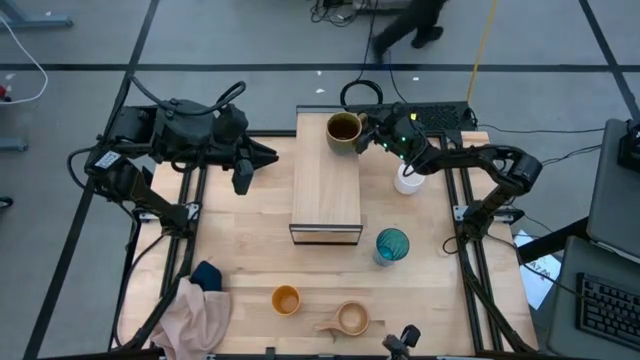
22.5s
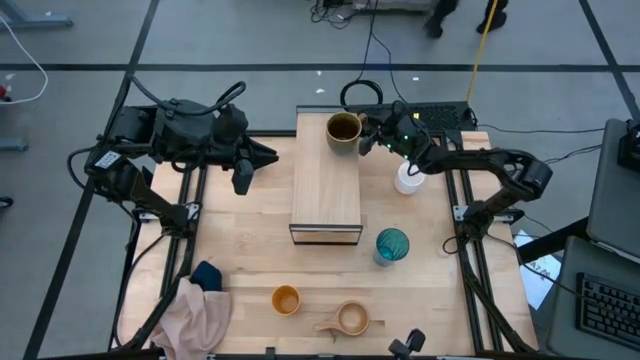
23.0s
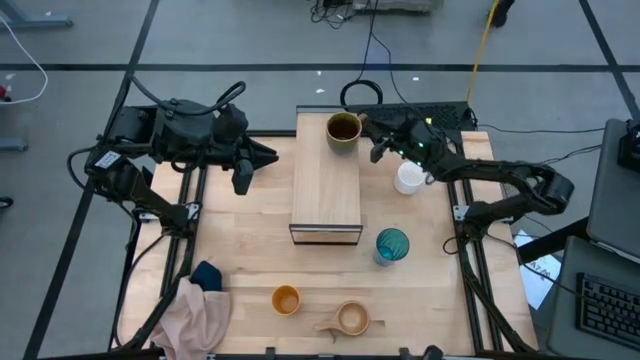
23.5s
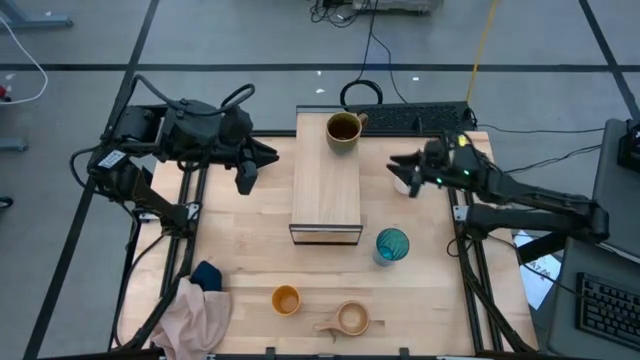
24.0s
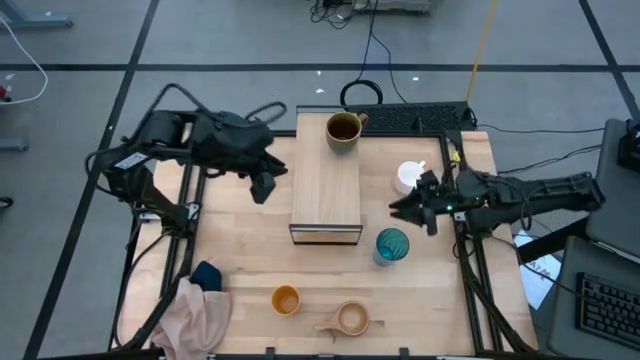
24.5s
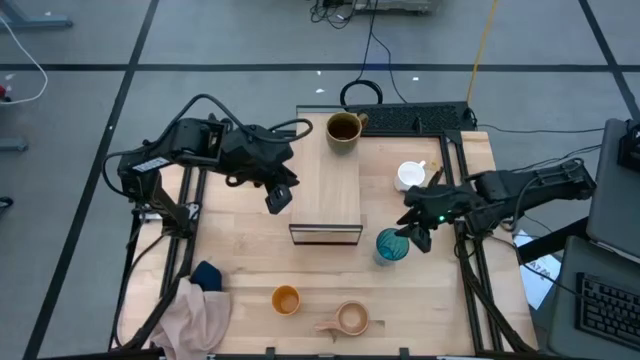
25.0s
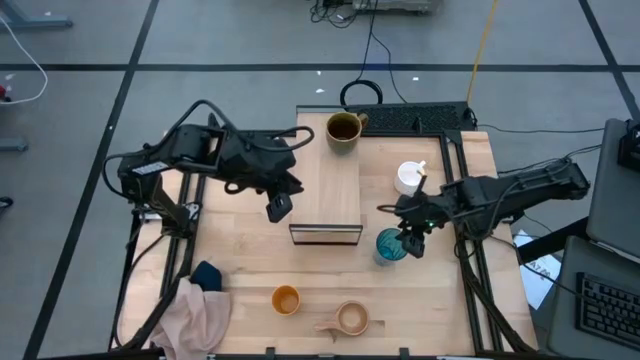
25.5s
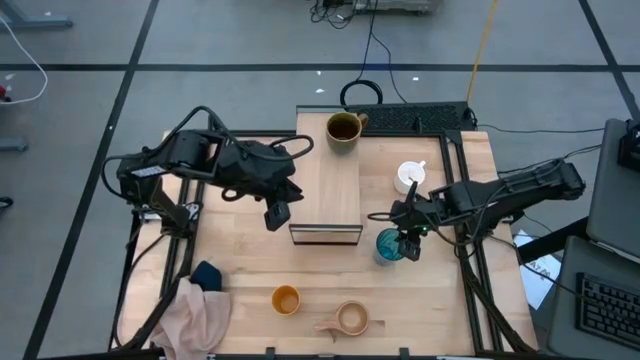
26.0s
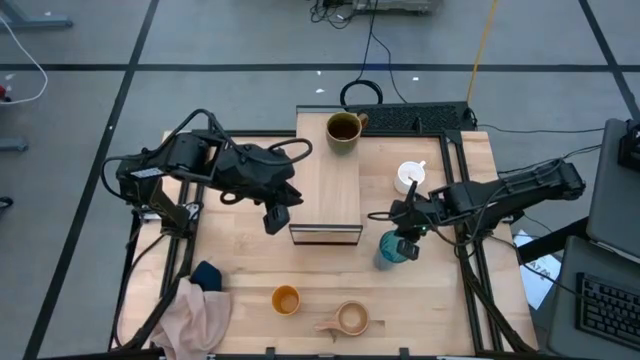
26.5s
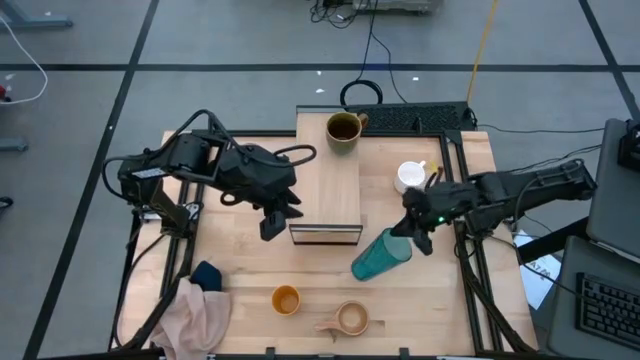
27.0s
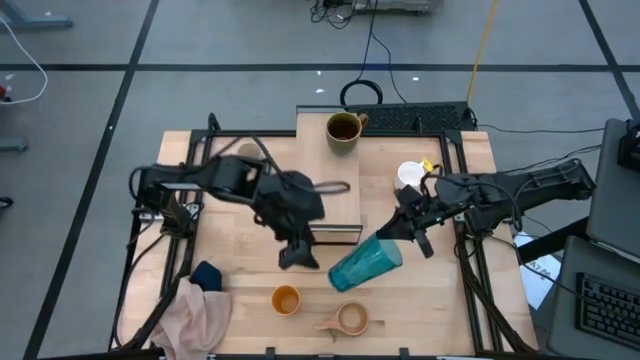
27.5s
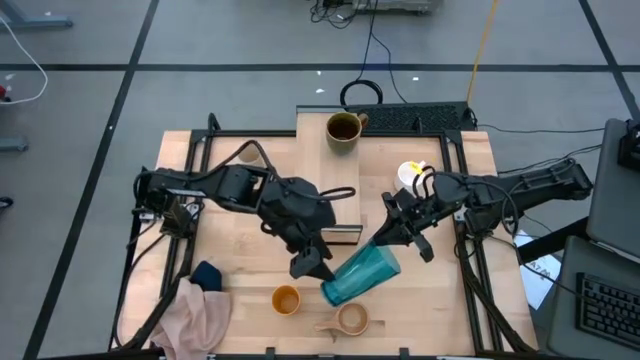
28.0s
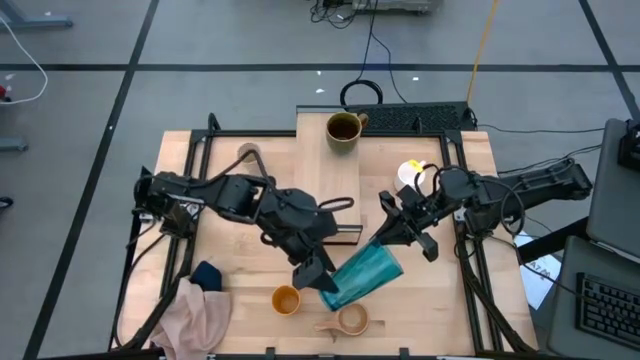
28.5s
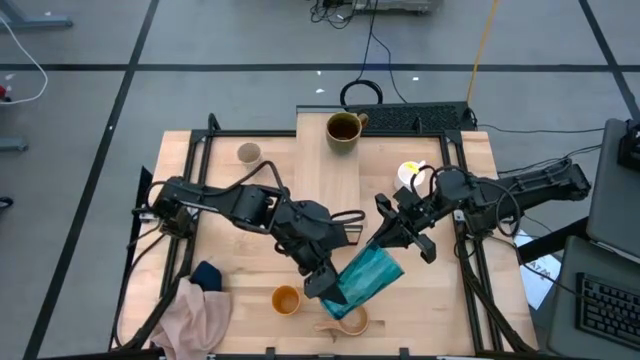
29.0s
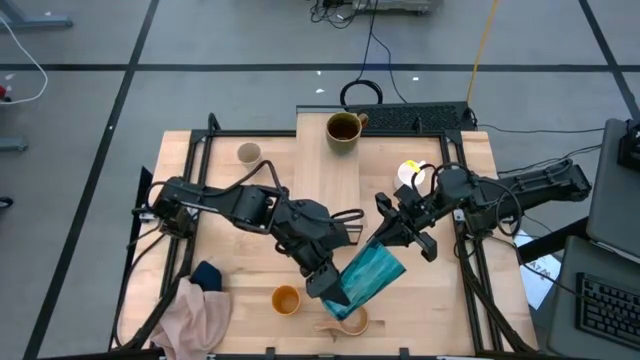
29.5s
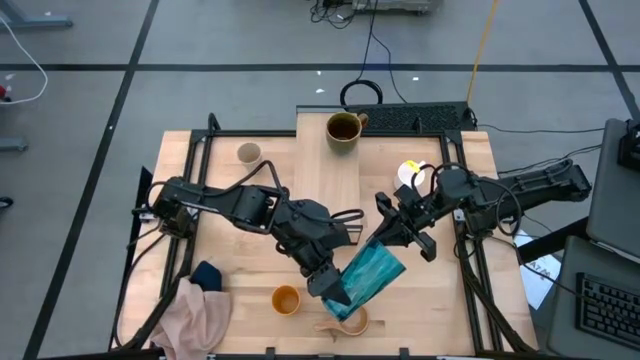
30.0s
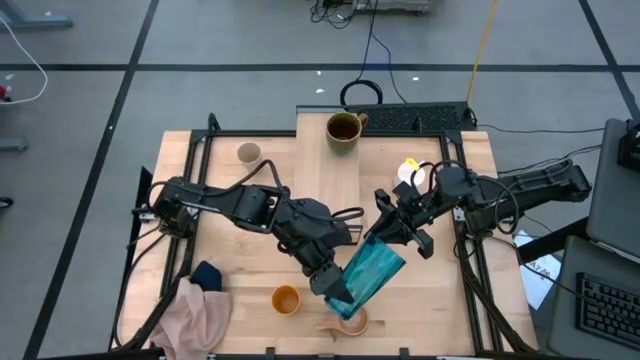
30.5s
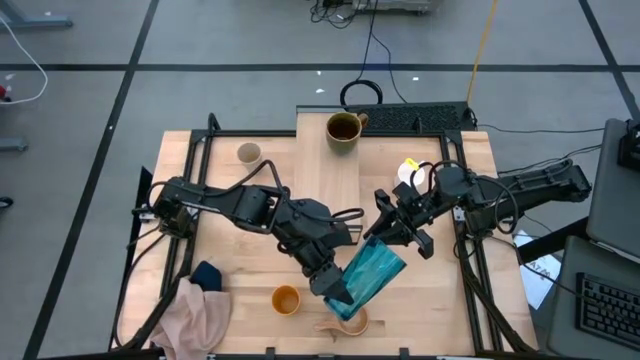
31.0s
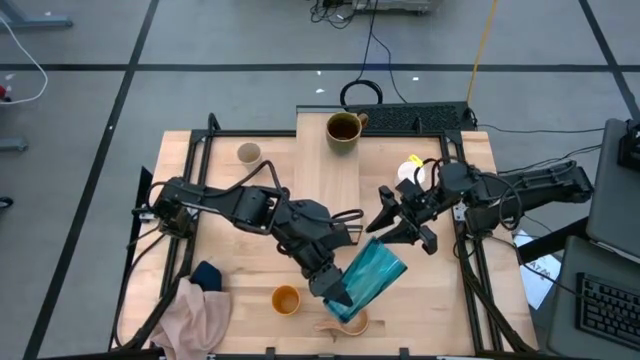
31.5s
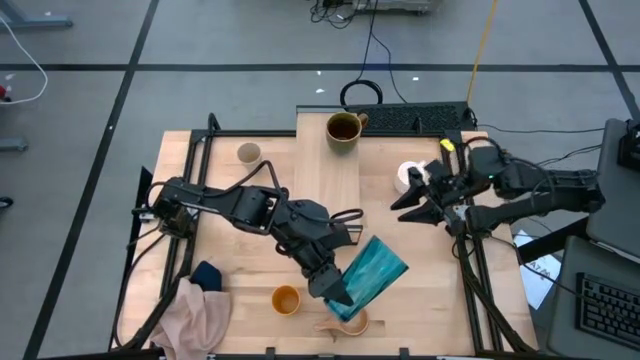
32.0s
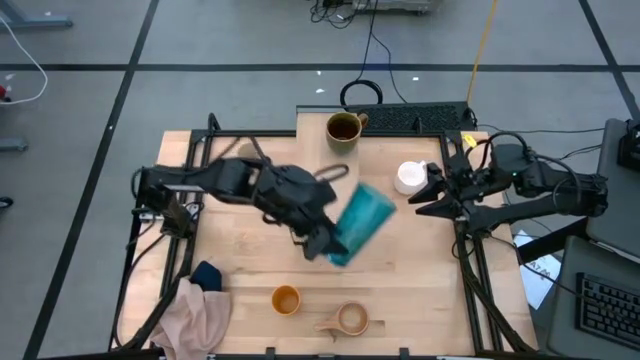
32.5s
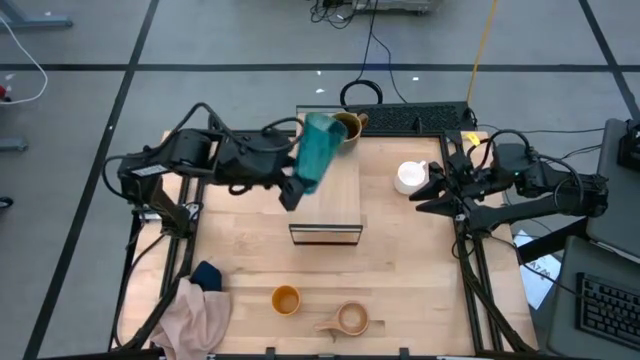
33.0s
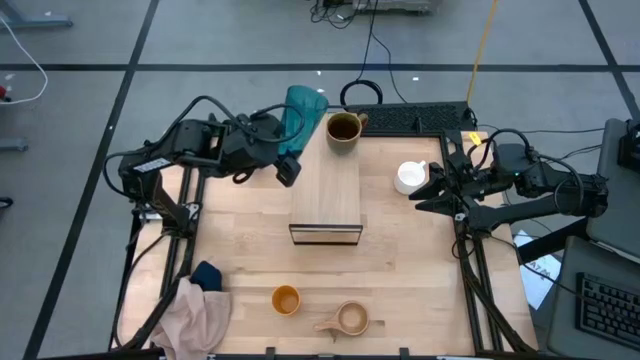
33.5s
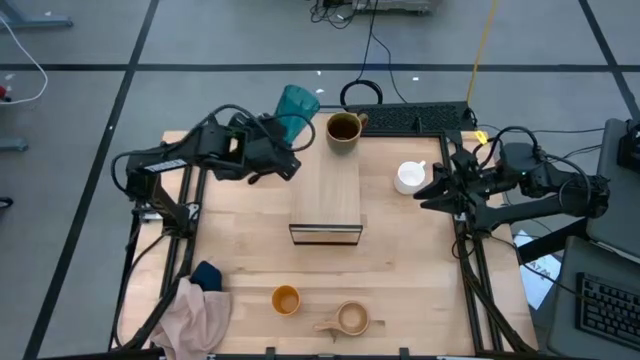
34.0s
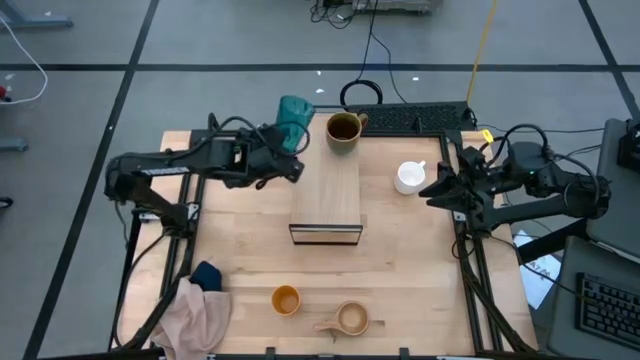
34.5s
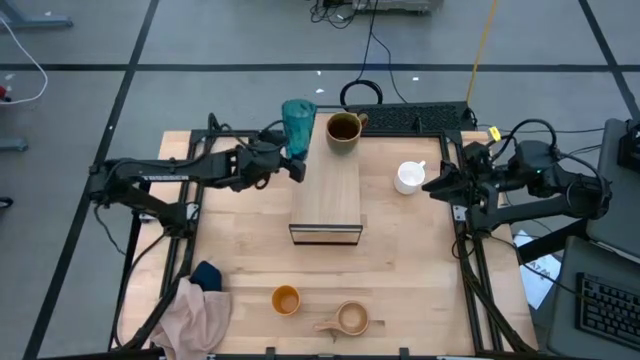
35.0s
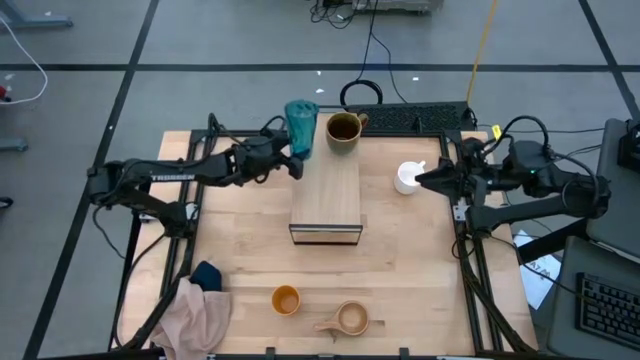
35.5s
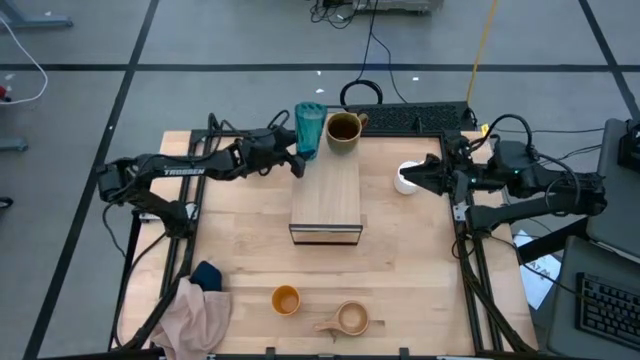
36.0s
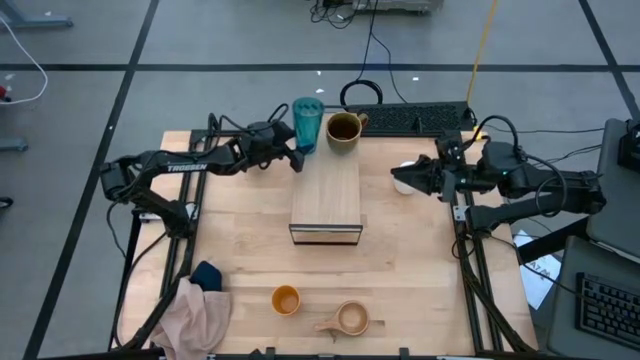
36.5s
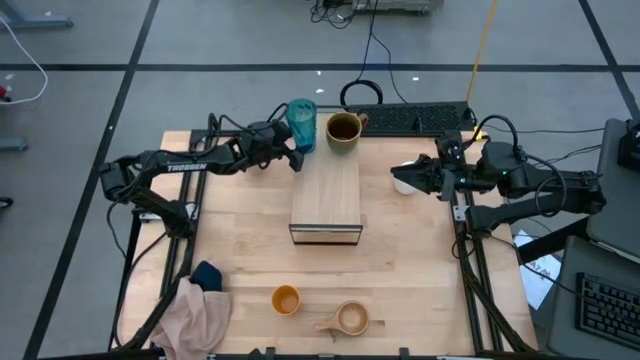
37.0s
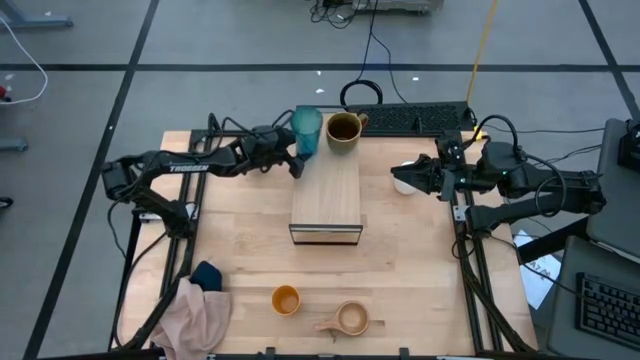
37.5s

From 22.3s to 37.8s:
Task: Stack small to large cups/mugs on shelf
Put the blue cup on the shelf
